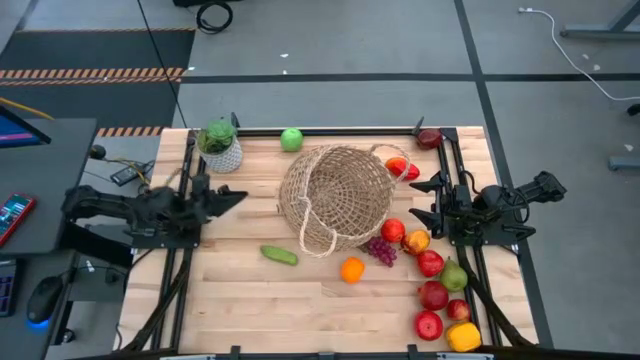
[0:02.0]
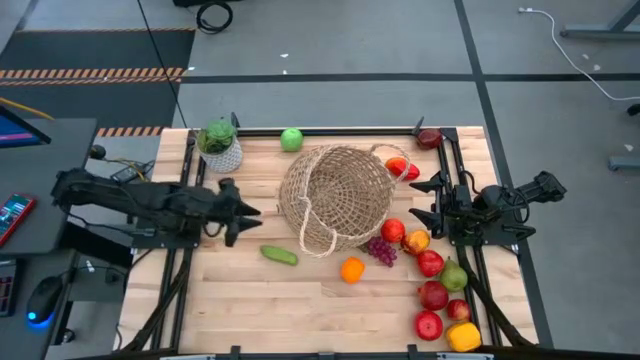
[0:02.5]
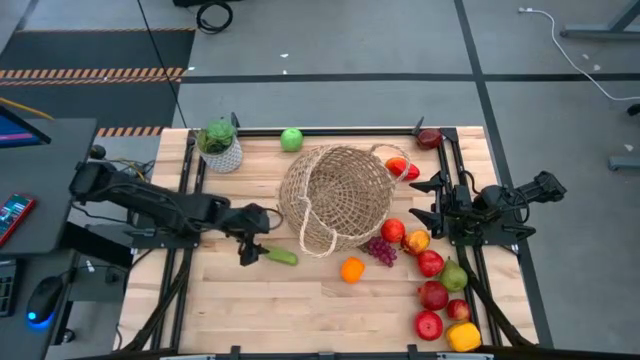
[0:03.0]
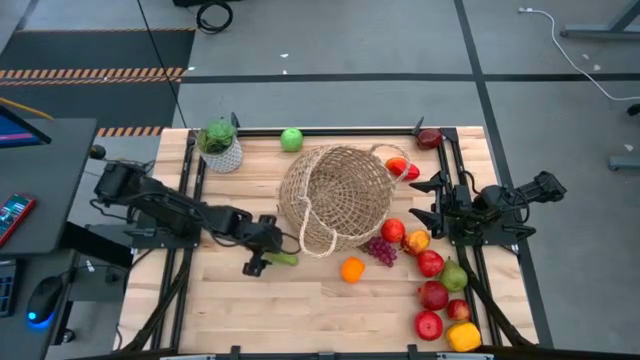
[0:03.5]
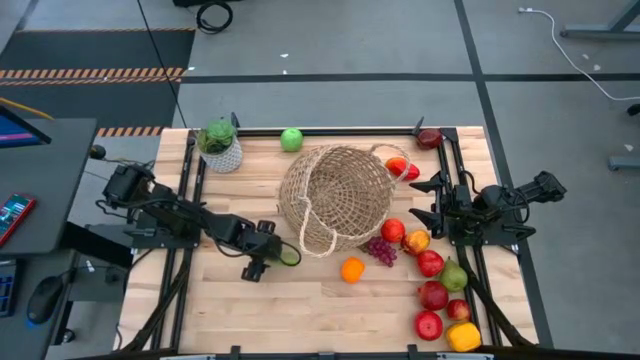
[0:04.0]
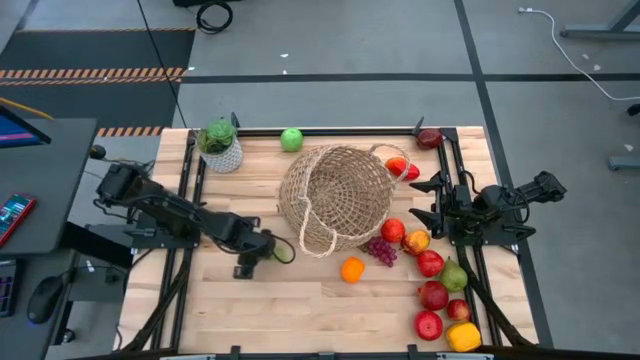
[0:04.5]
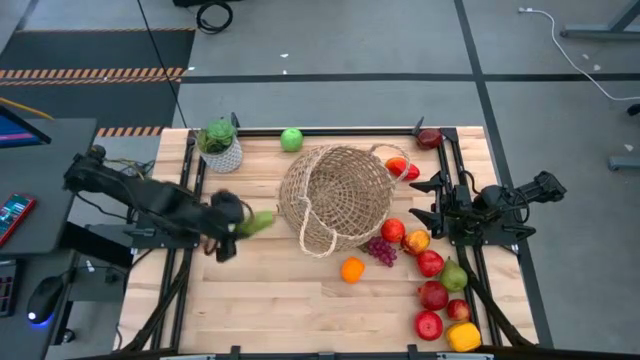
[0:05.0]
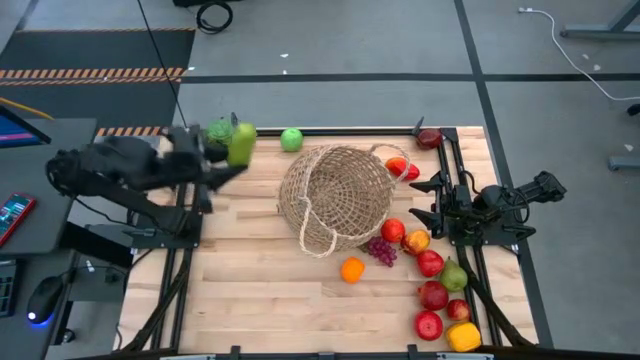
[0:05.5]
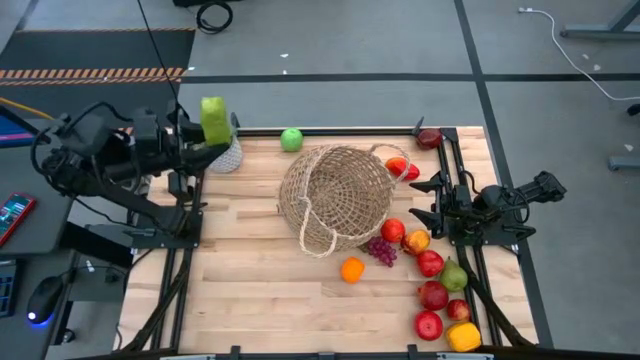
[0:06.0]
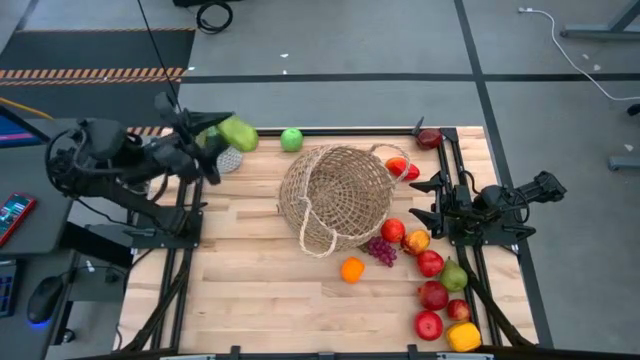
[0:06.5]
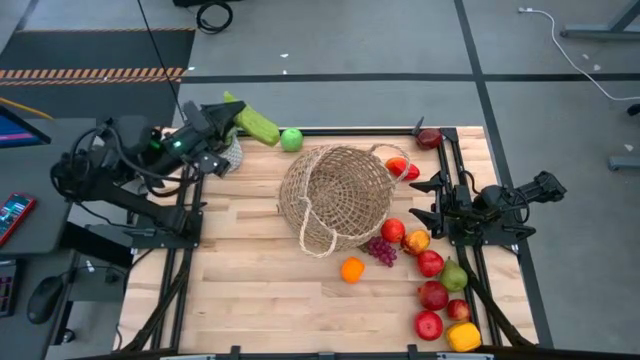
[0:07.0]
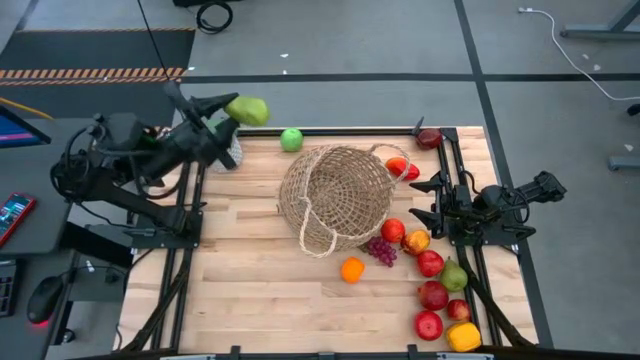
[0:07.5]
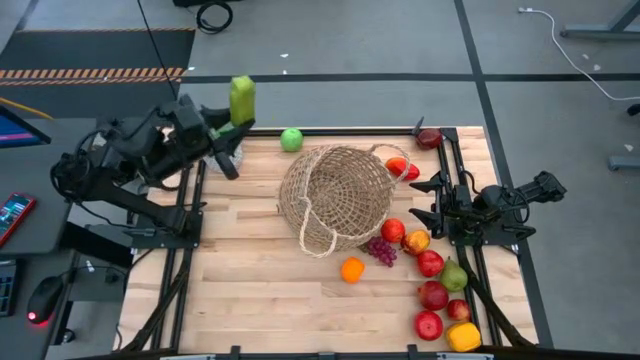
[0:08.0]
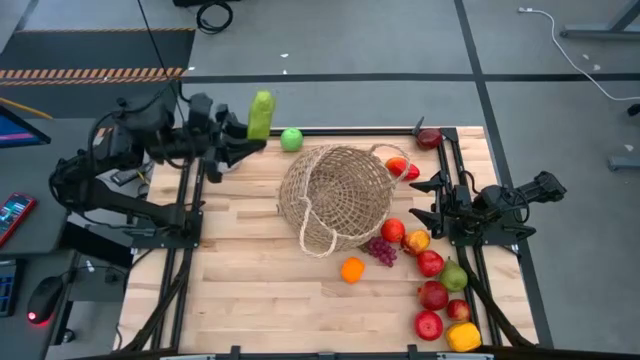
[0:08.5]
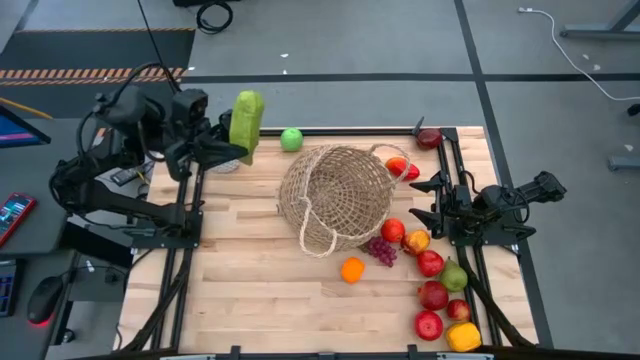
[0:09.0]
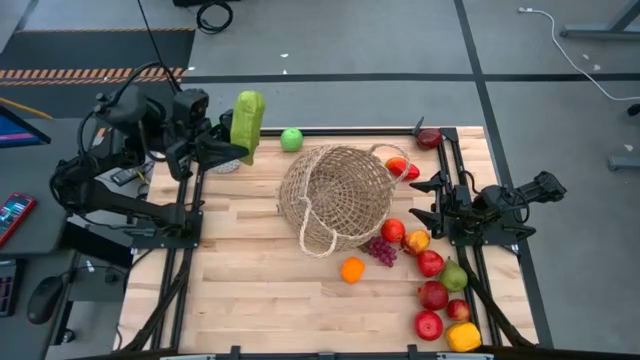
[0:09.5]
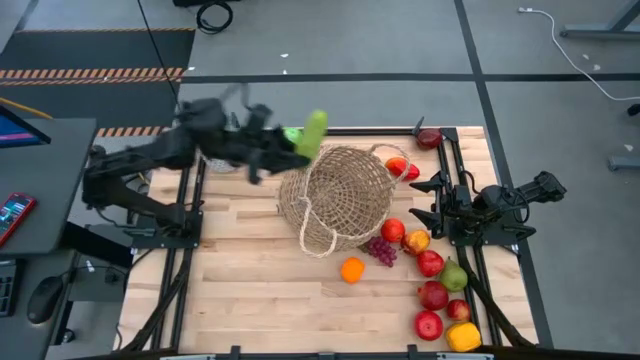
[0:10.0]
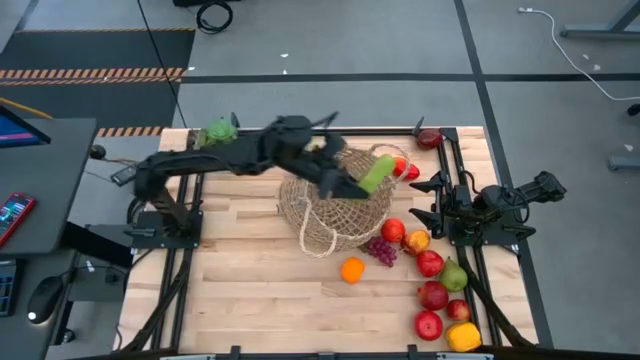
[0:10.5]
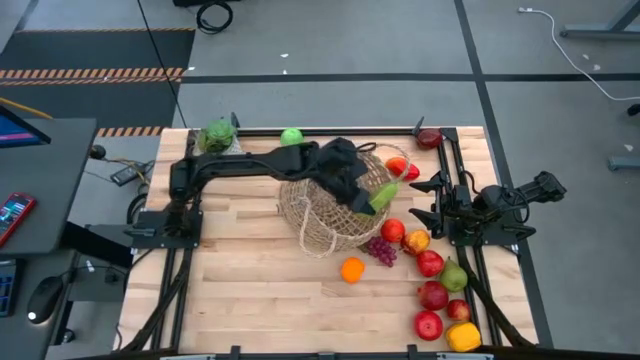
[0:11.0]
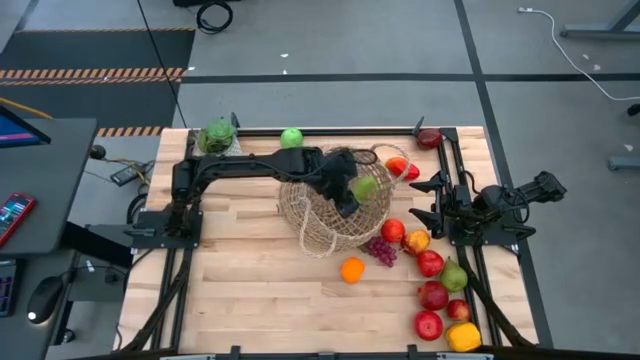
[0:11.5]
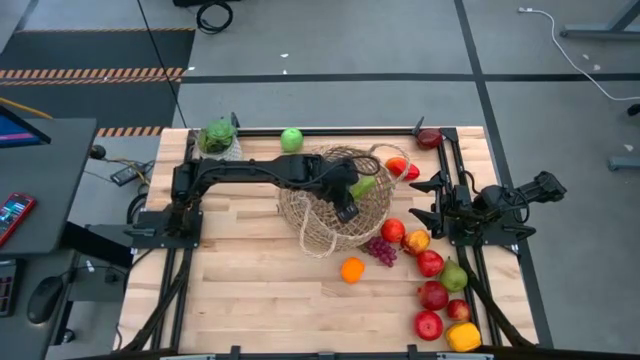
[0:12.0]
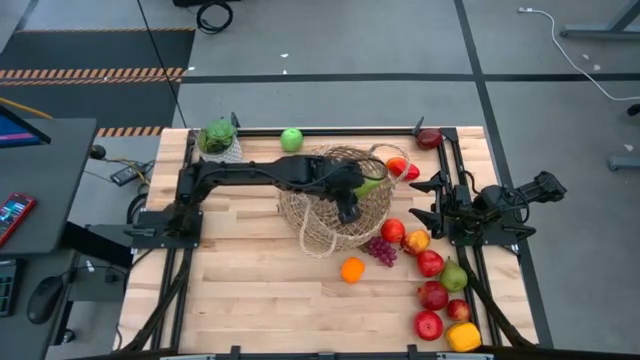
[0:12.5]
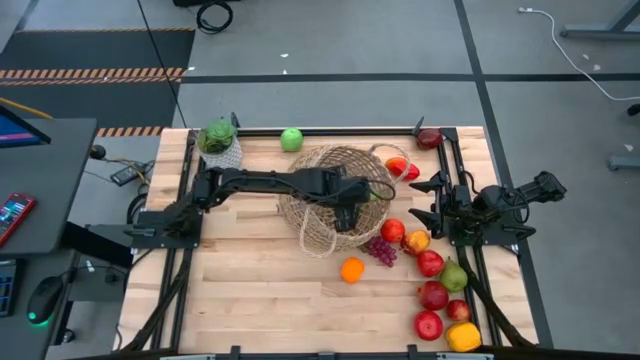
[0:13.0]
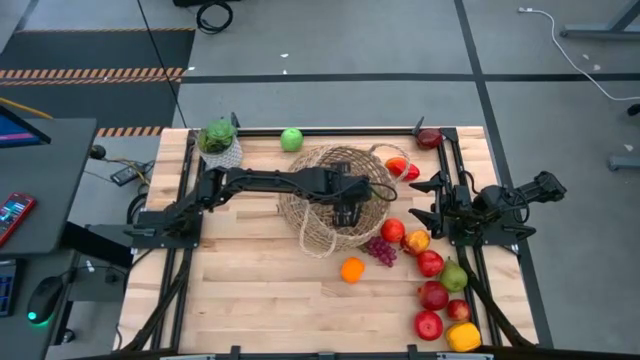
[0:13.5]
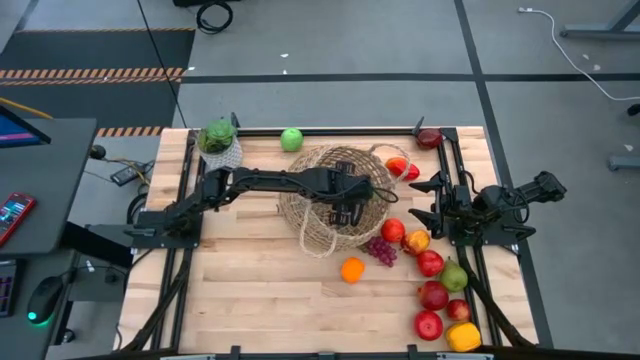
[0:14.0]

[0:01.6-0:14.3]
Task: Build produce basket
Put the green cucumber into the woven basket

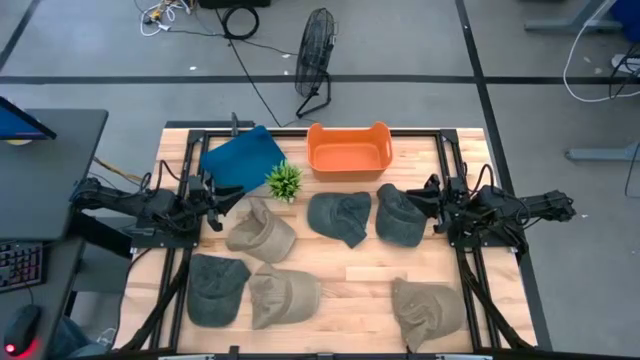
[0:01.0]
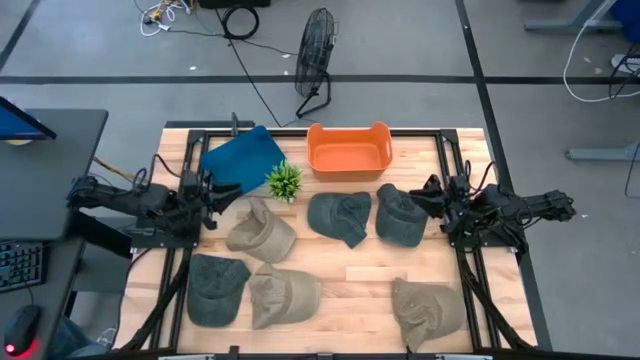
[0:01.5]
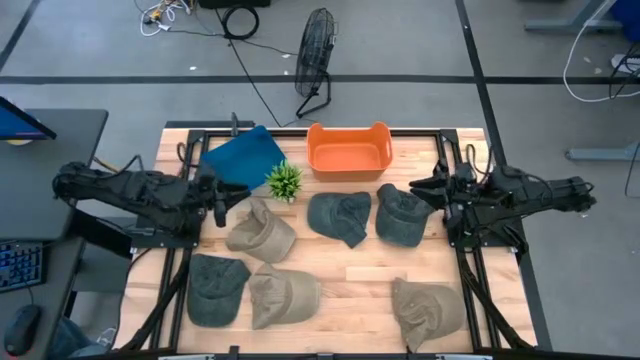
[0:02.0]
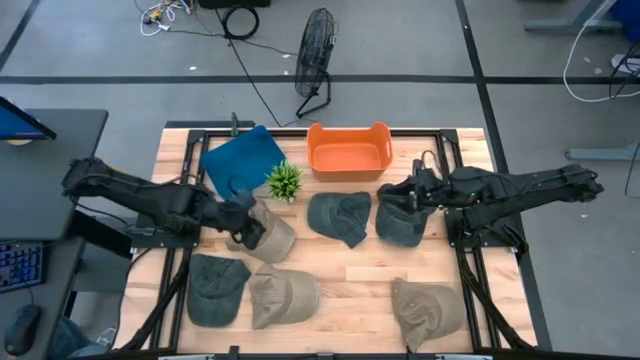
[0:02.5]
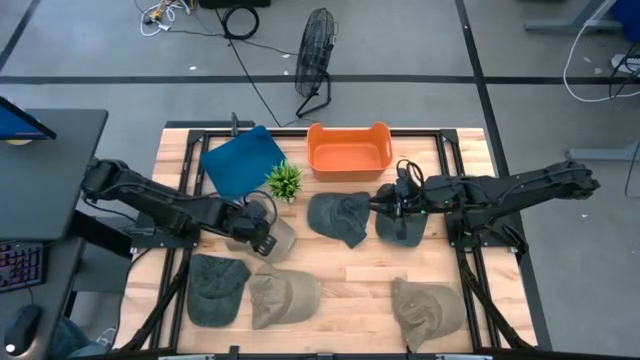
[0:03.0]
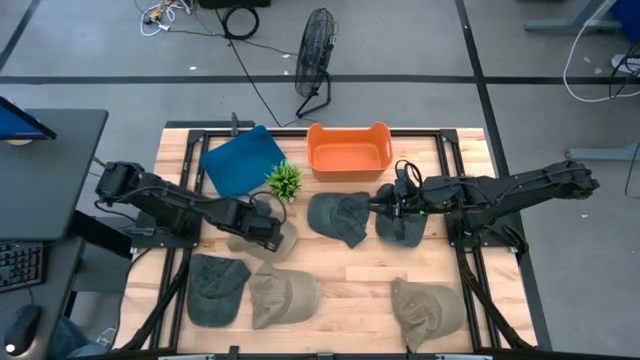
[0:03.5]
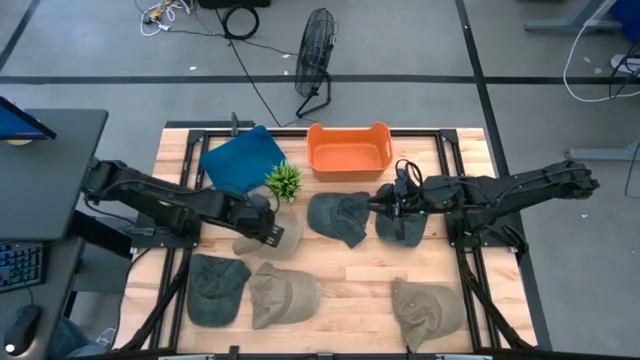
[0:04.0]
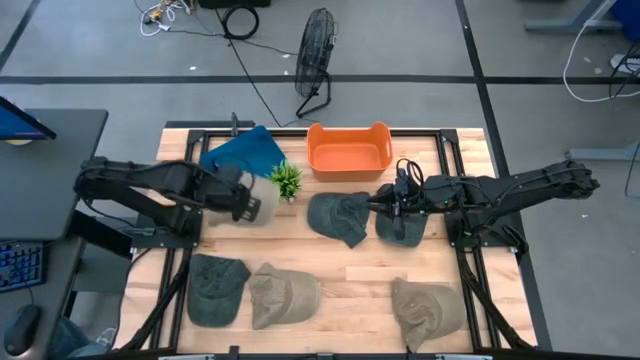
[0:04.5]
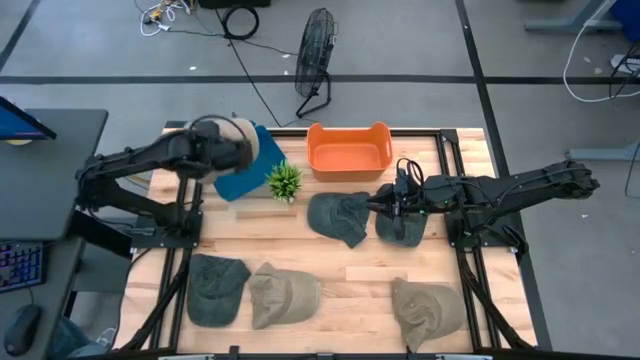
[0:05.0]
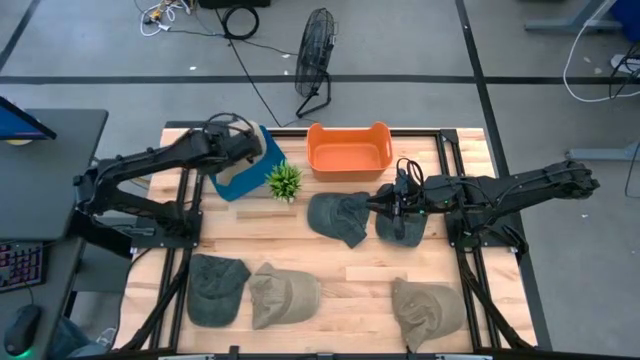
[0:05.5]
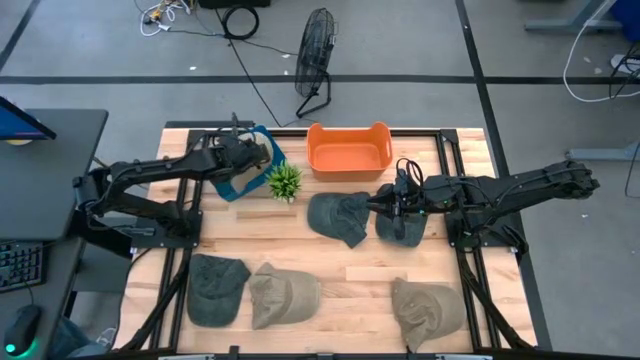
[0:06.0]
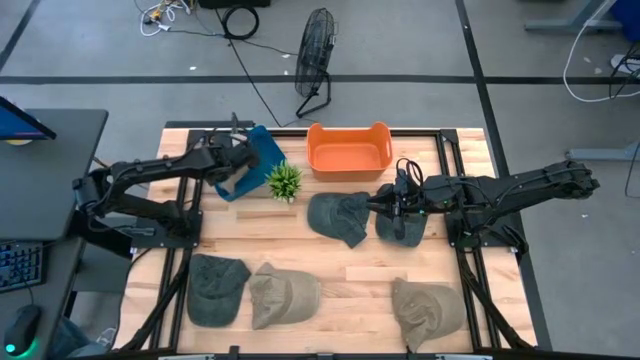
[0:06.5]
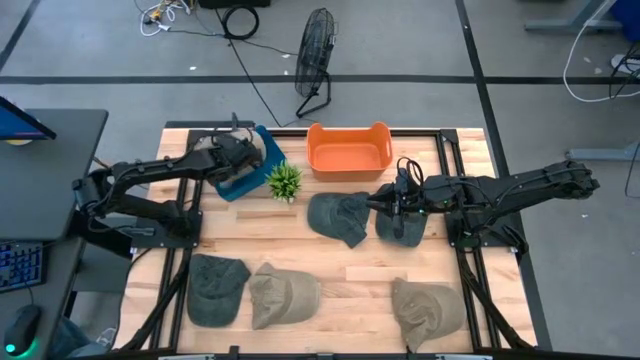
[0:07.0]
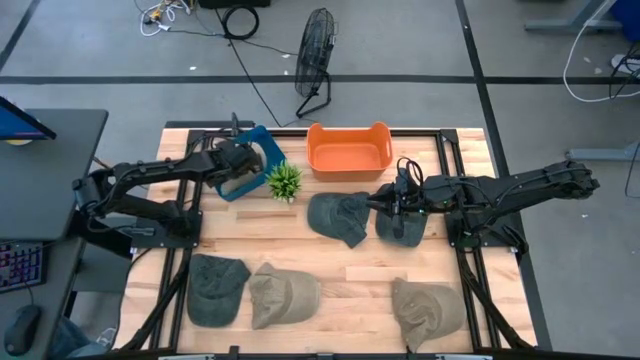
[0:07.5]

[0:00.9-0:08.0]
Task: Pick & Place hat
Put the top brown cap into the blue bin
